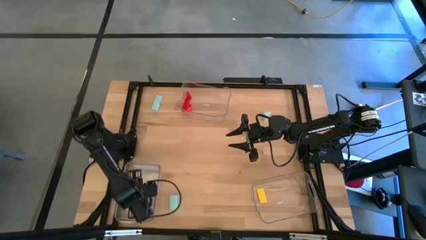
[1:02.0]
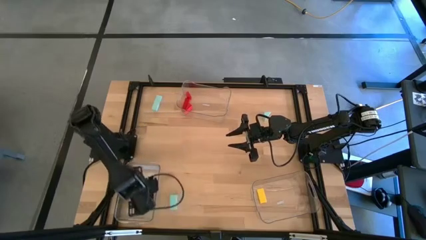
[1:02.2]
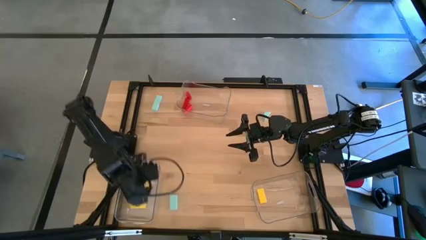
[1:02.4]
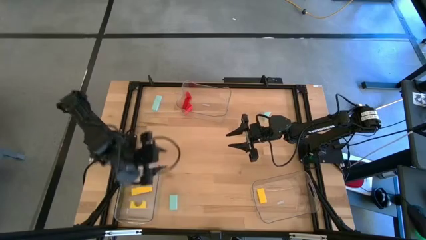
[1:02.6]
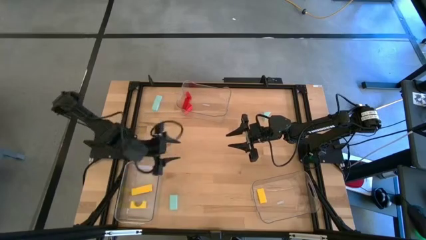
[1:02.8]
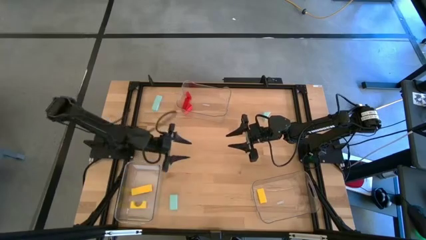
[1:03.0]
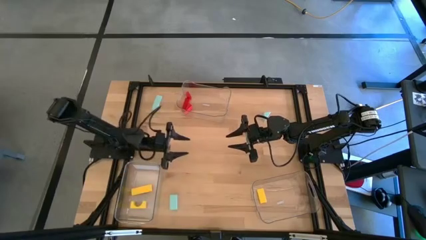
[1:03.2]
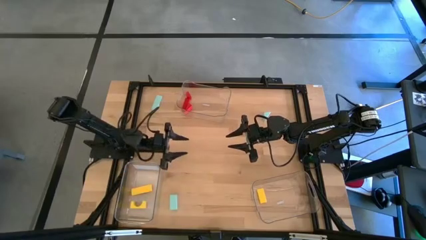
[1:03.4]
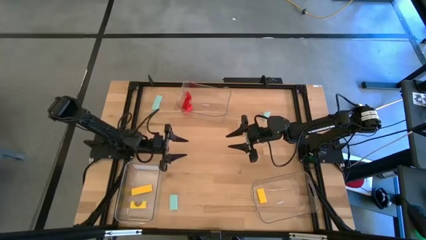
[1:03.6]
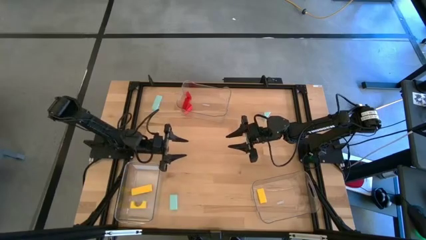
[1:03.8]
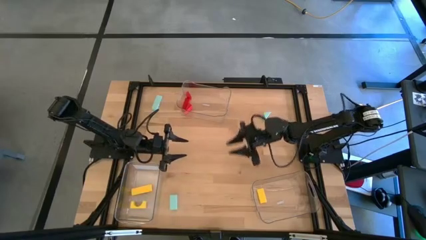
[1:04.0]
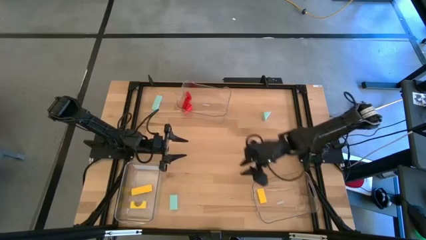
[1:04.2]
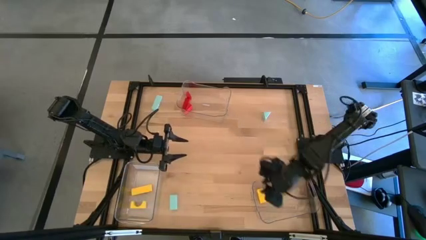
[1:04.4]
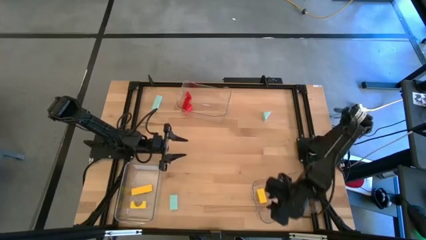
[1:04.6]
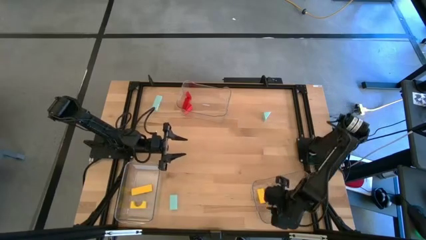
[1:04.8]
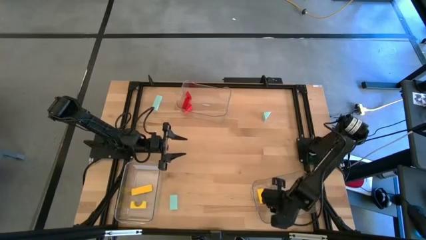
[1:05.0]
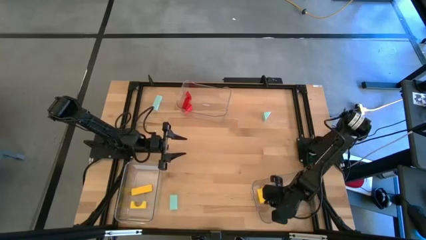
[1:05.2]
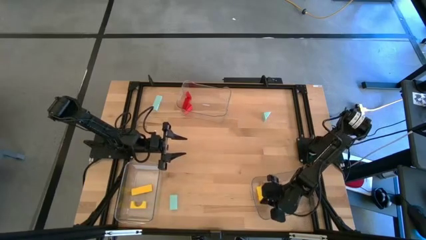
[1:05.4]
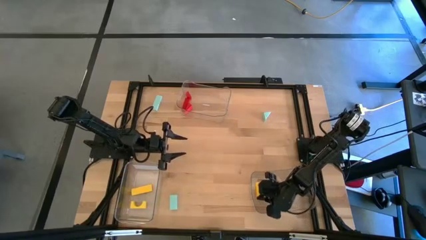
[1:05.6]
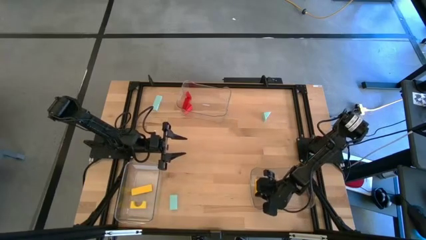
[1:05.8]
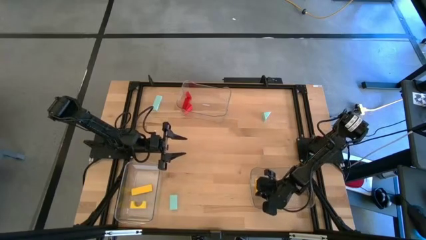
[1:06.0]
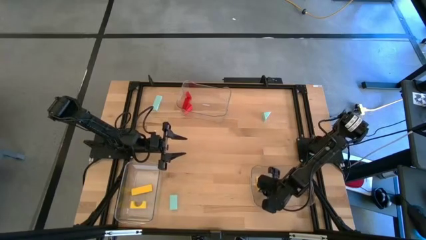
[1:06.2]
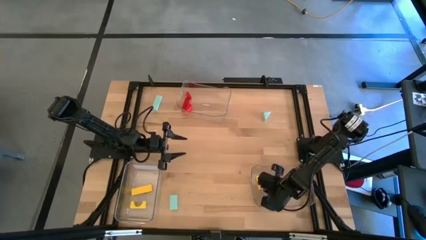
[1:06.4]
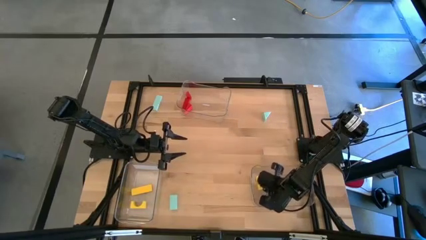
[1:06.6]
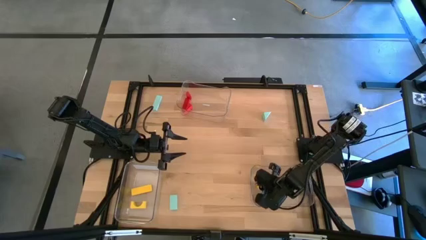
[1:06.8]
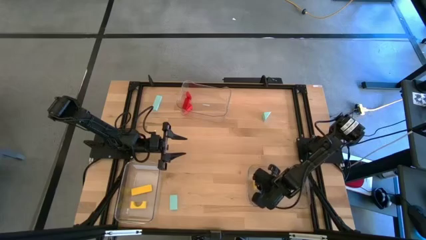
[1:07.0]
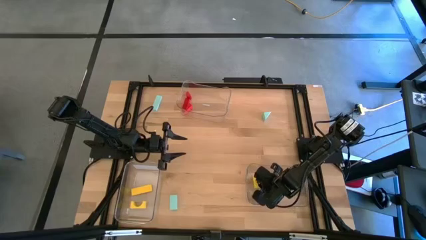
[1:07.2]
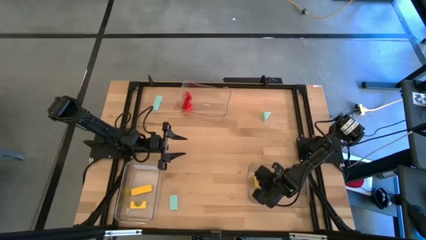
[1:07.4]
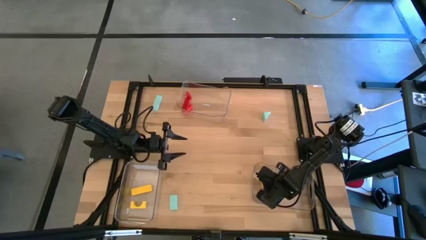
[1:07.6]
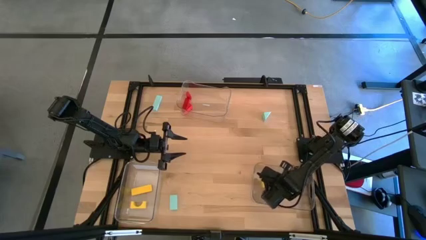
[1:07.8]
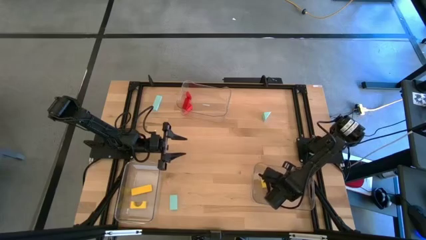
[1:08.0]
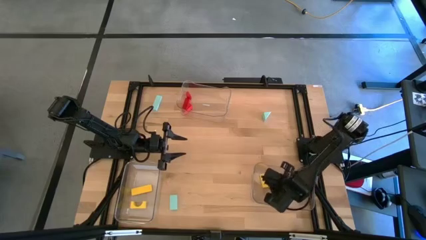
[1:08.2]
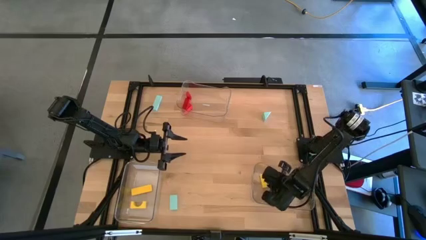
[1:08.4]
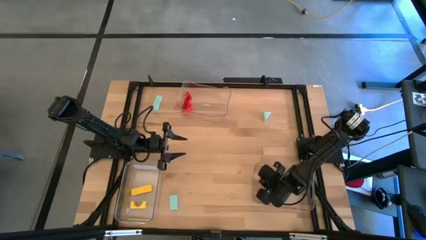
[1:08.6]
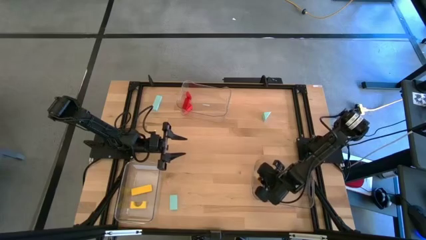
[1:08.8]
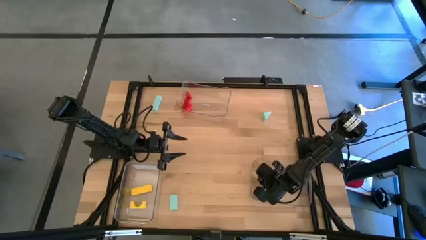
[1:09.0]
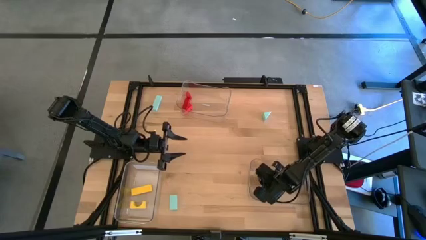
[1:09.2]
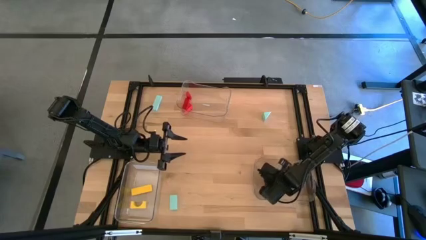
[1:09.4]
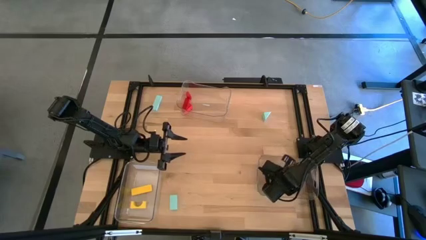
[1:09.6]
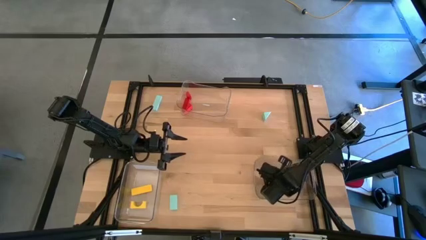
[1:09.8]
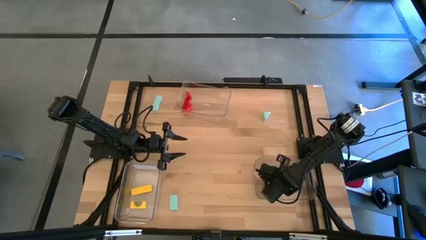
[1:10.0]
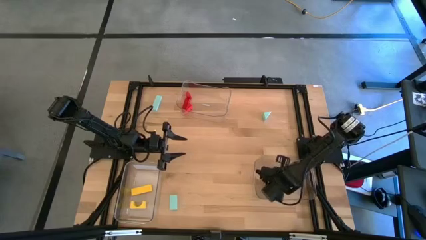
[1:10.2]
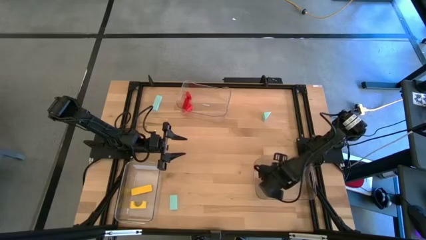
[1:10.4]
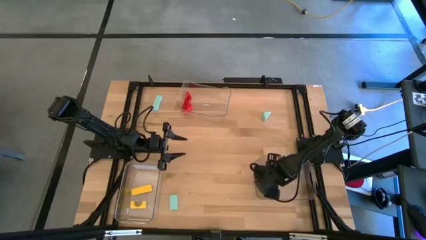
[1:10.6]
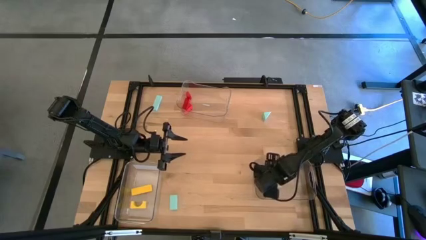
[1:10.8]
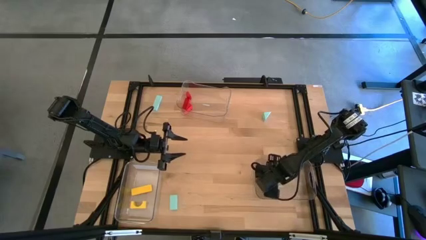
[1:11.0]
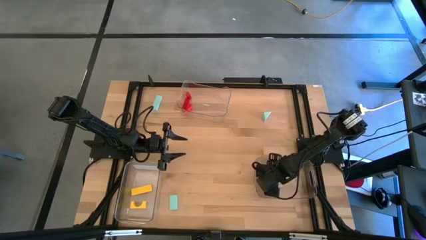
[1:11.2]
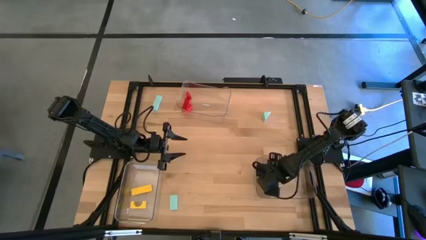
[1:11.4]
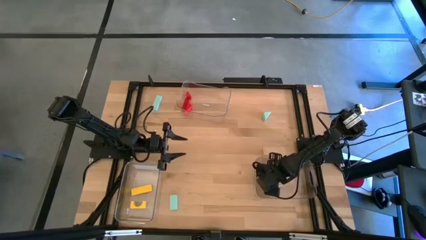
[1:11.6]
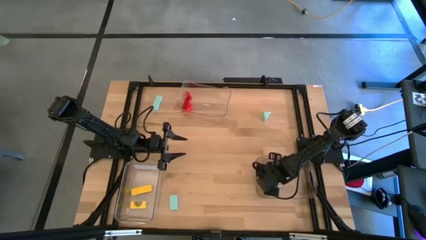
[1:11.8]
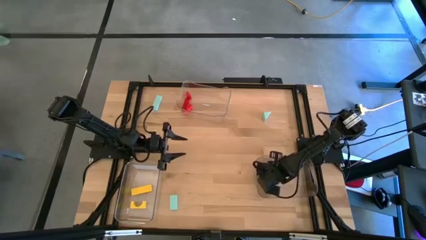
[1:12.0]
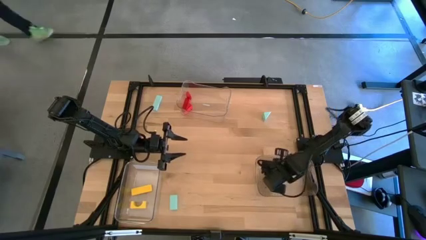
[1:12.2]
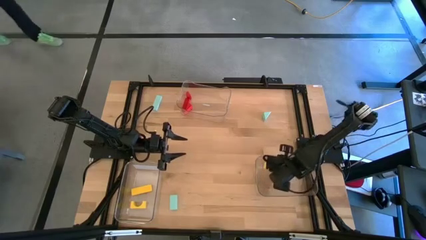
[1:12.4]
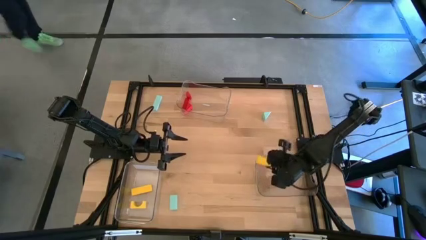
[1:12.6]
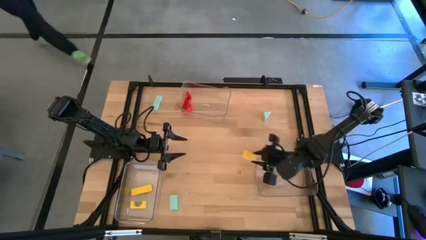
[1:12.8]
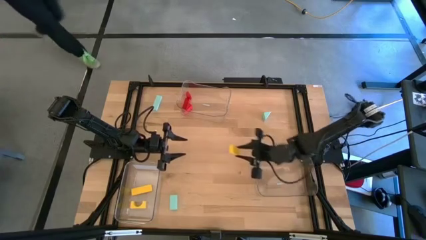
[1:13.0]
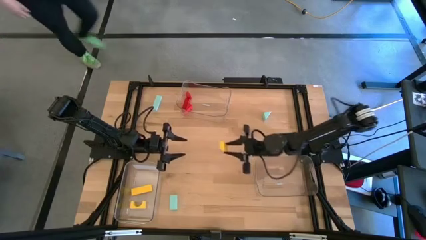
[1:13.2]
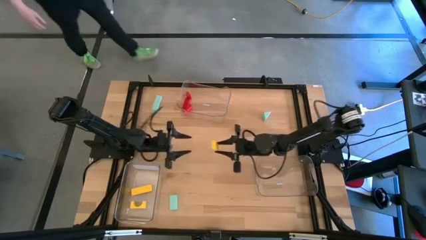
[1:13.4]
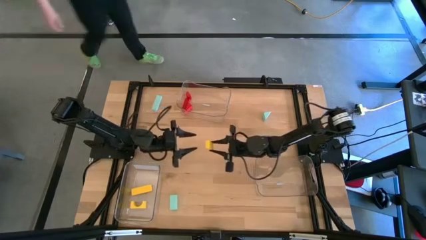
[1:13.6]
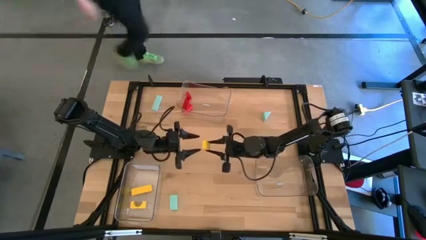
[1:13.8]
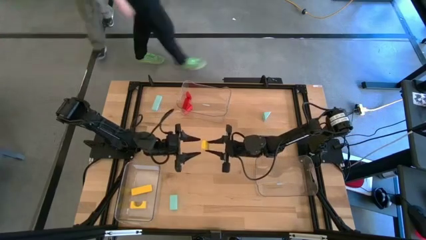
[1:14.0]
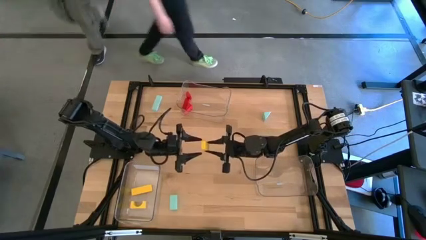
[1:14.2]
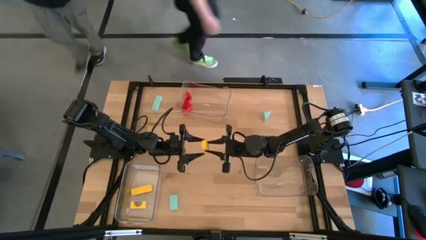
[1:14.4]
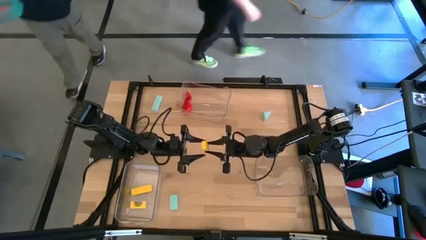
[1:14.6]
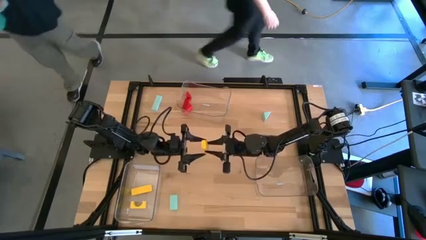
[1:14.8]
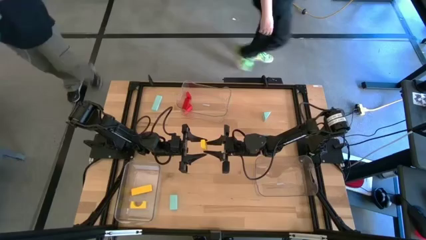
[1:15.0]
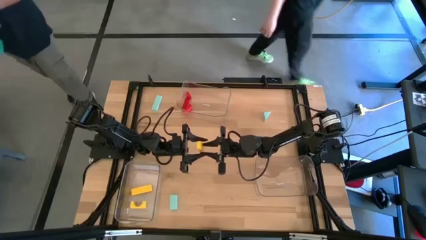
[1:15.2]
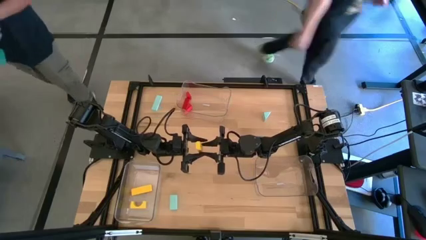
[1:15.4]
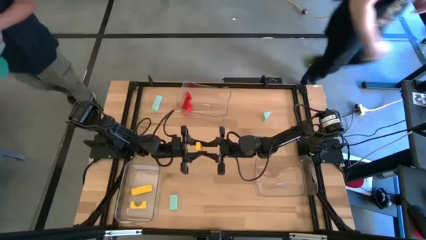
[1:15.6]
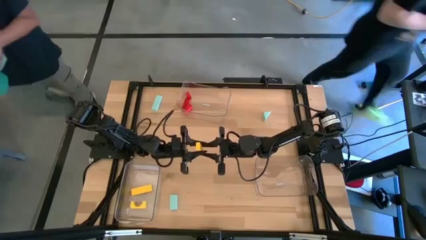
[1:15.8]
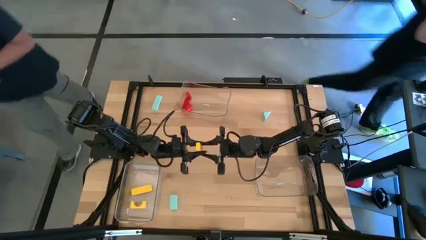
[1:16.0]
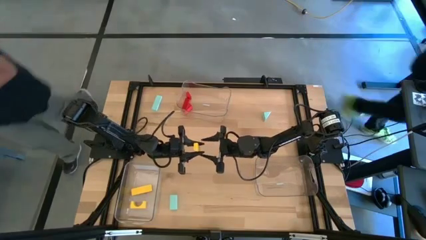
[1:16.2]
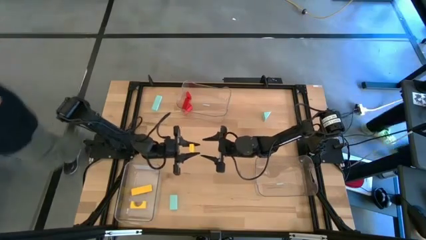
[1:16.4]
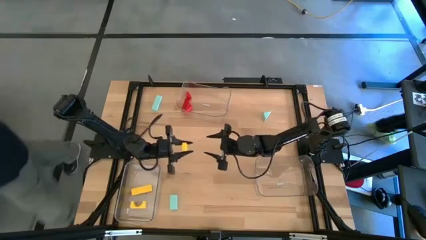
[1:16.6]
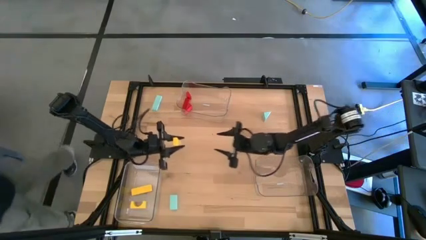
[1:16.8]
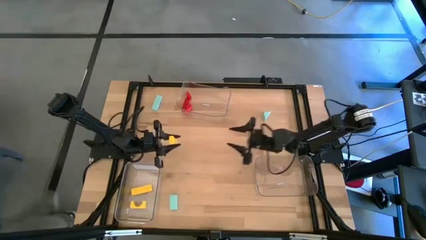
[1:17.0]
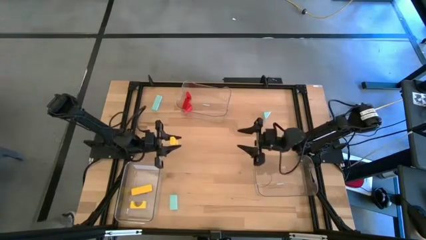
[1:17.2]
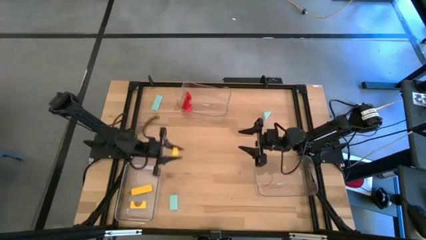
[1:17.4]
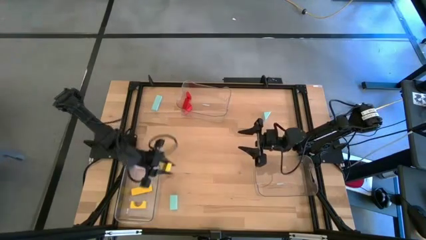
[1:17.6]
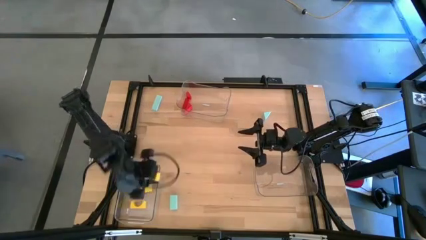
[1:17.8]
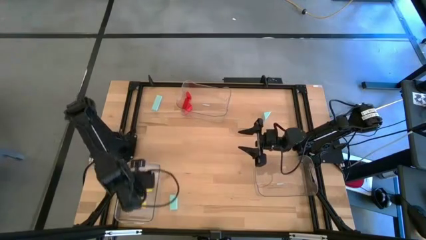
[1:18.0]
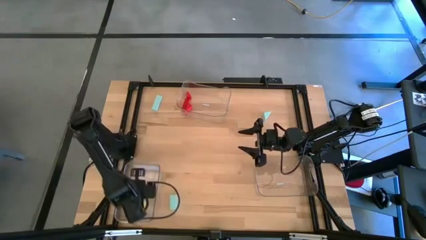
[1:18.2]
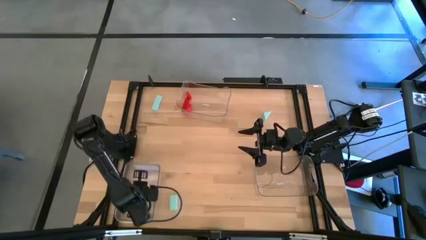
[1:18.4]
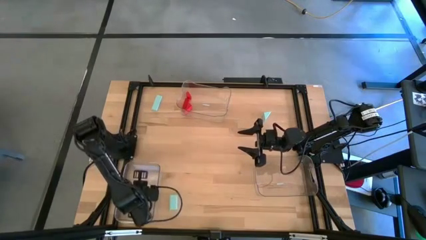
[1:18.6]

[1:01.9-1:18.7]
Task: Sort & place blocks by color
Put the top right yellow block into the bottom left transparent bin
